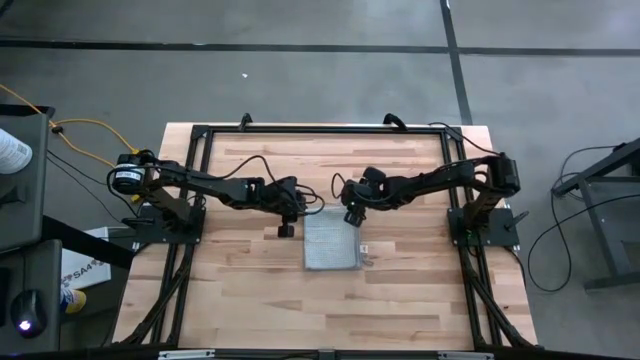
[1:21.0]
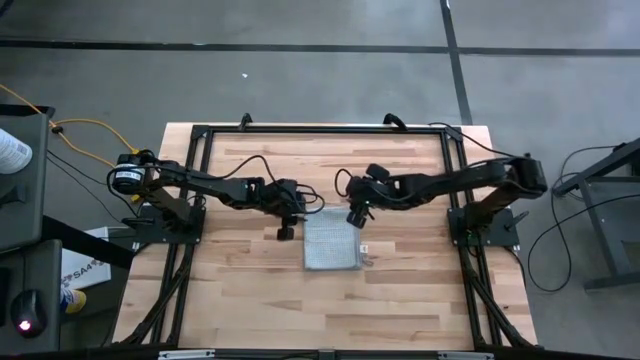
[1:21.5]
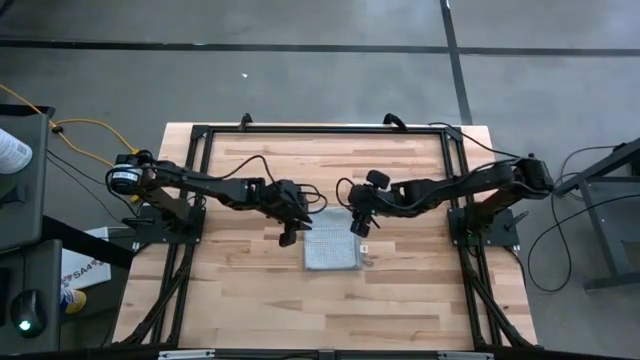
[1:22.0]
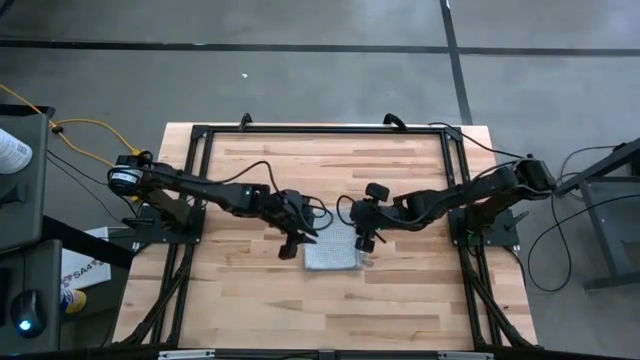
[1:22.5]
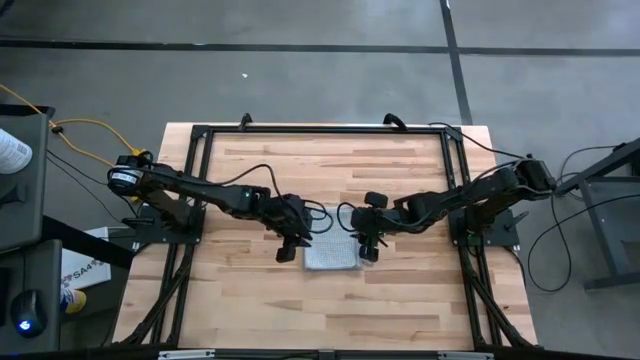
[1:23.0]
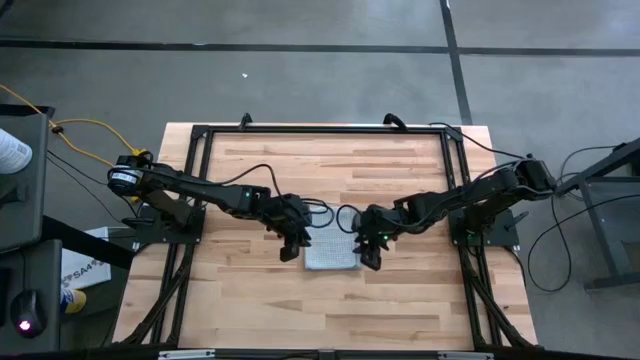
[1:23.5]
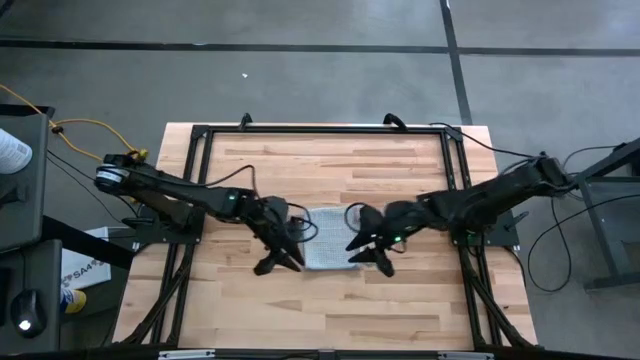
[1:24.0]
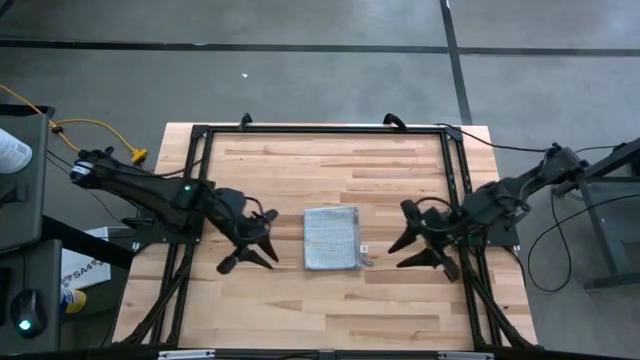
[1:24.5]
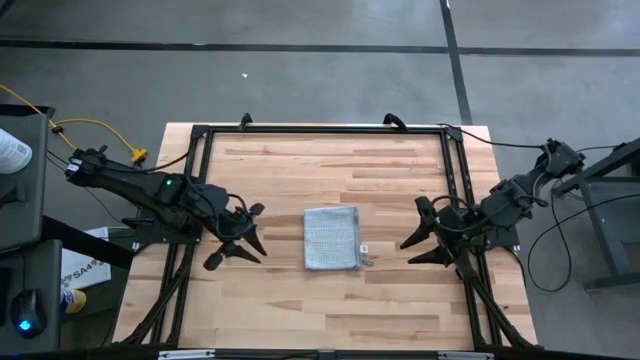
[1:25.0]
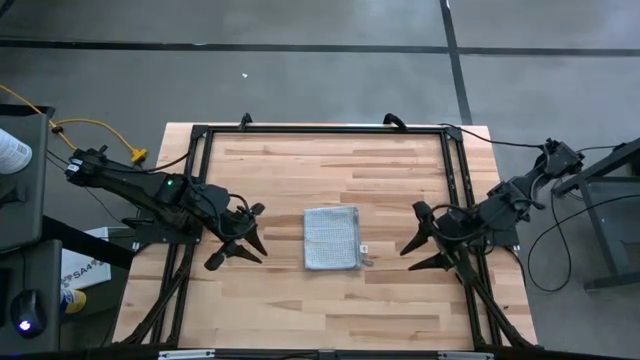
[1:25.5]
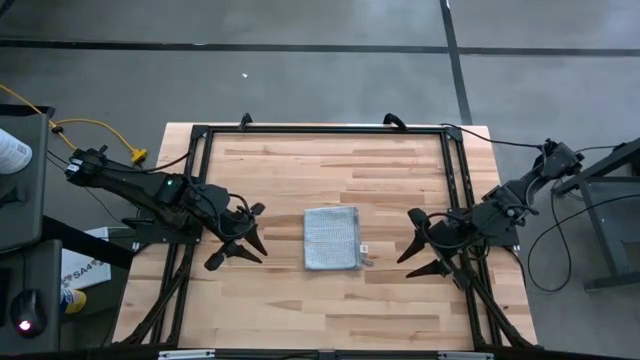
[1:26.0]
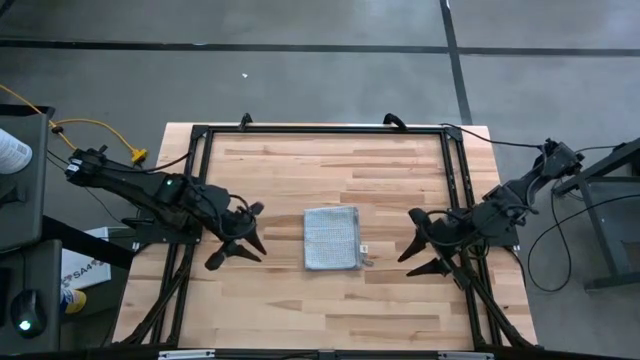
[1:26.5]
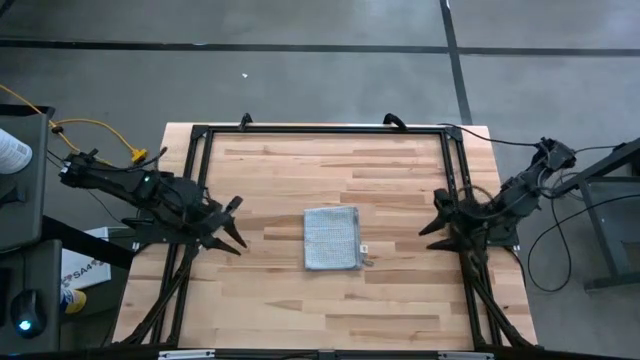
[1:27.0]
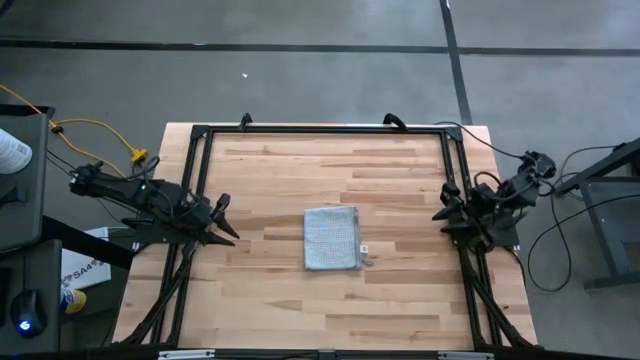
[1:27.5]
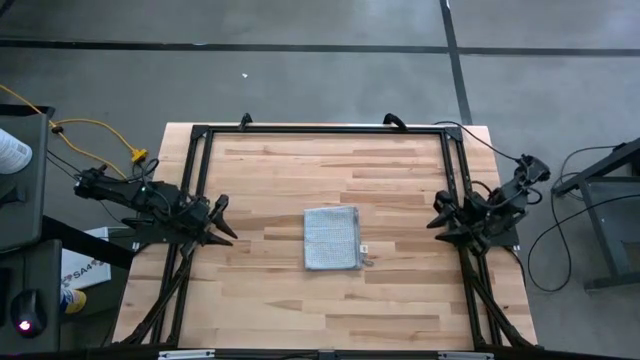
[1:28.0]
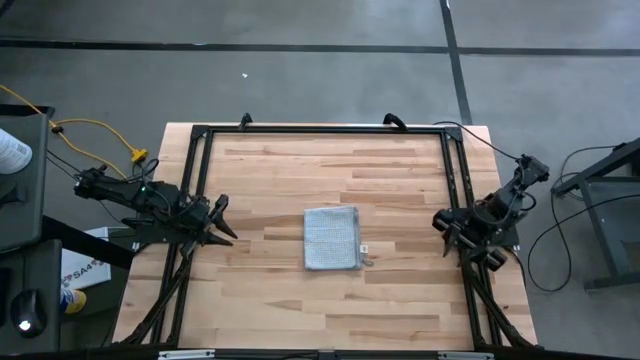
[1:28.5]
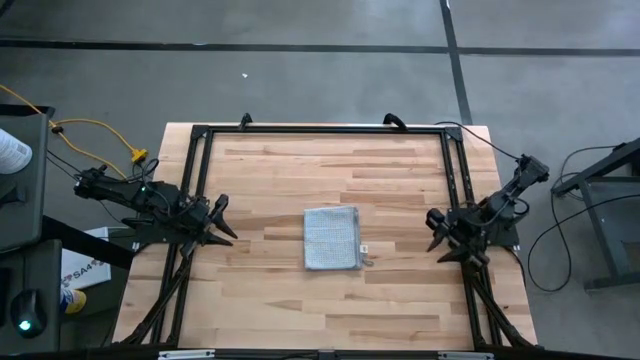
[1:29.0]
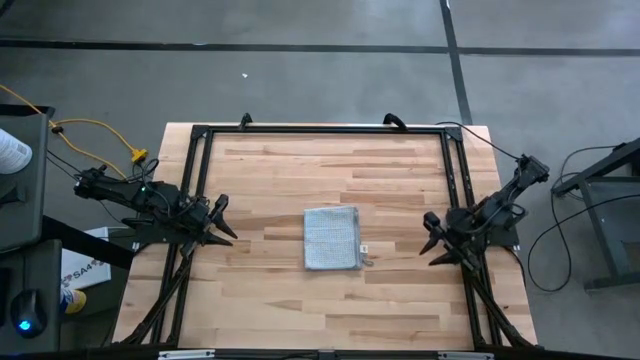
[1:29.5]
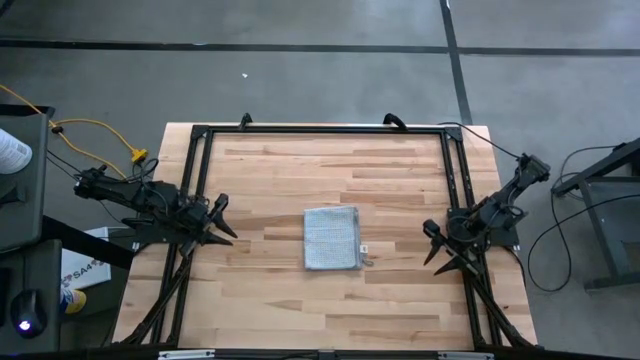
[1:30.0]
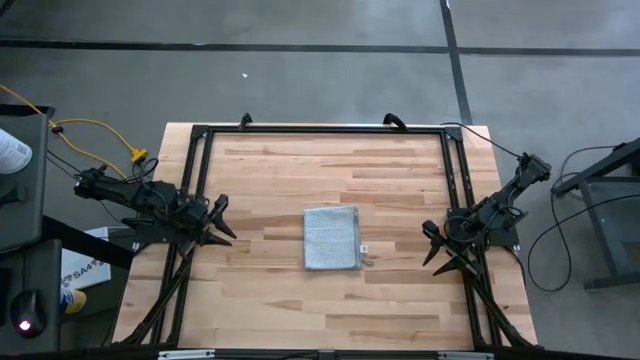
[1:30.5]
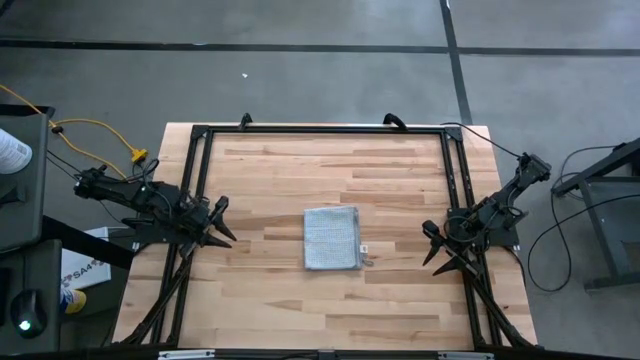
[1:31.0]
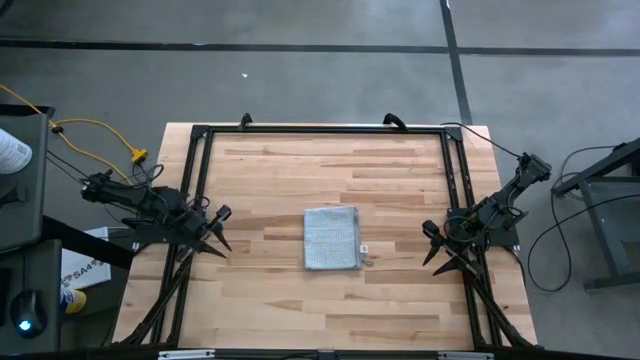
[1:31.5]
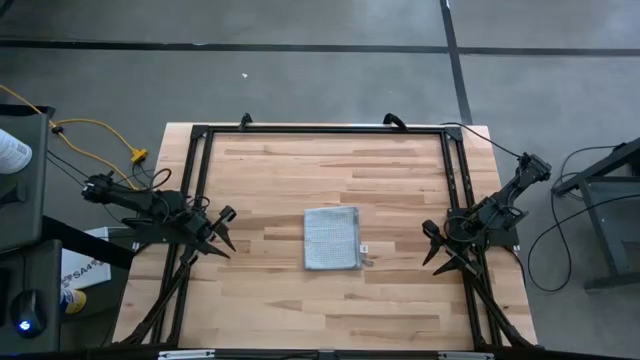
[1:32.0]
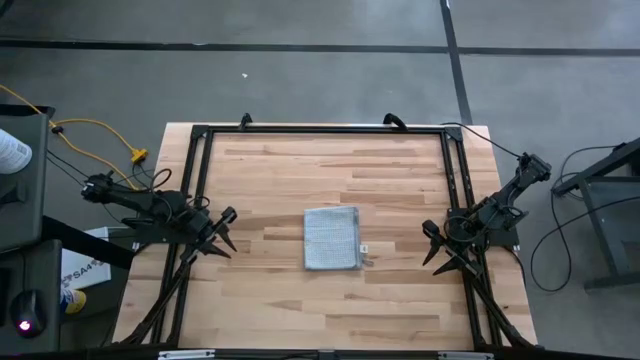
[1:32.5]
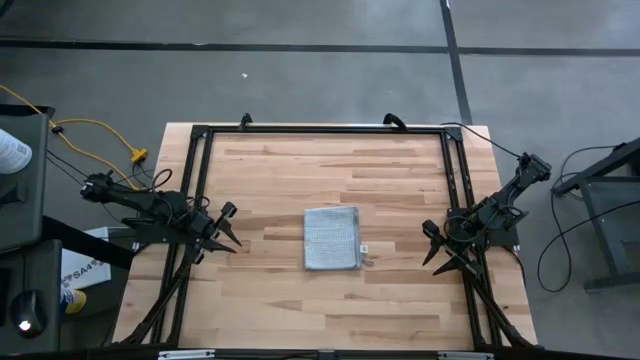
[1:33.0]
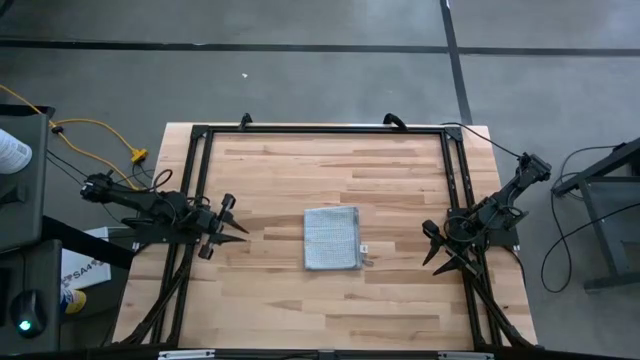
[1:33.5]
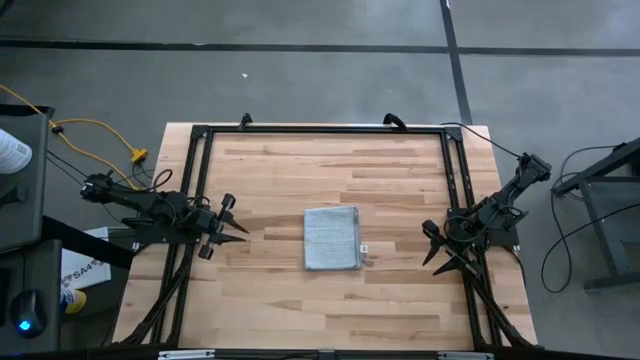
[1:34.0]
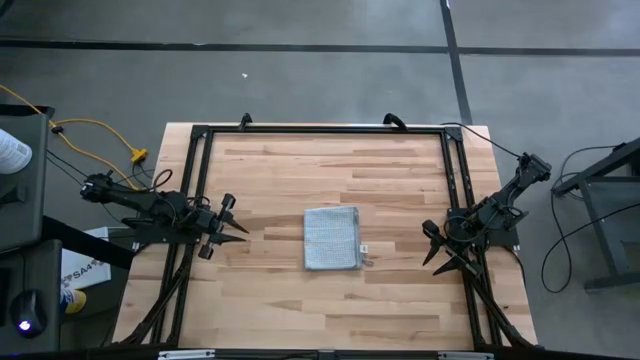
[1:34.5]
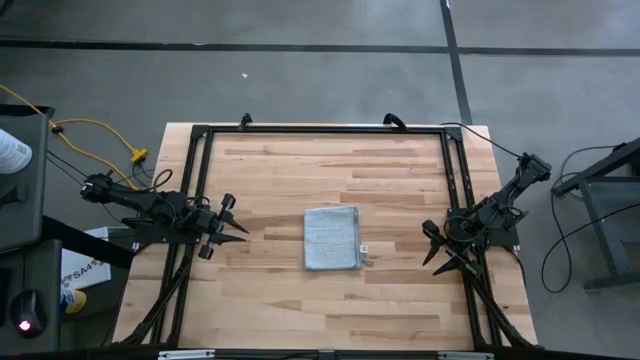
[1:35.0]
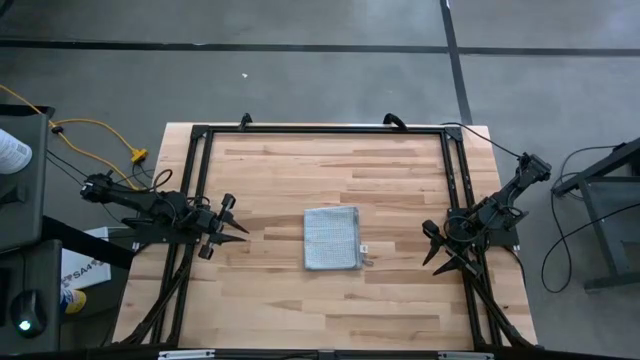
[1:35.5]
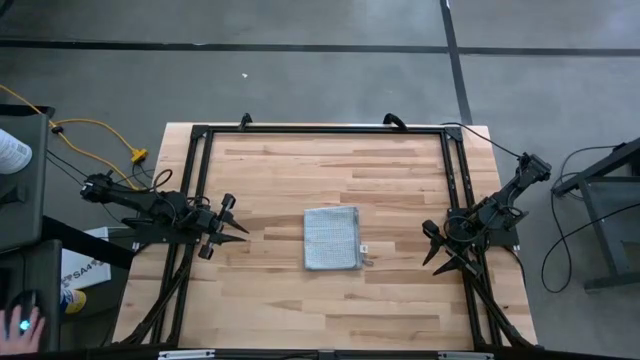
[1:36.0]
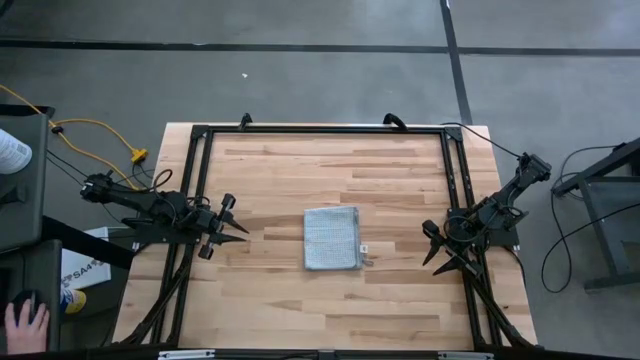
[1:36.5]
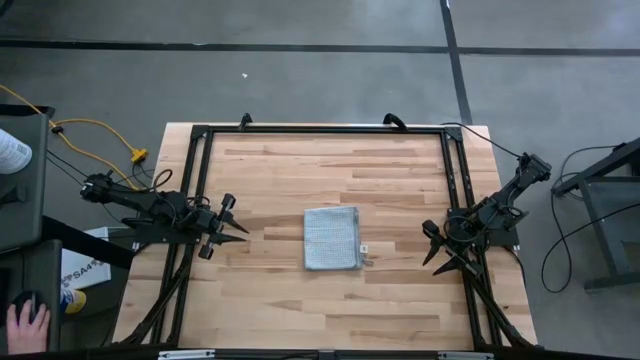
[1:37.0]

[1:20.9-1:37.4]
Task: Fold microfiber towels
Return To Home Position

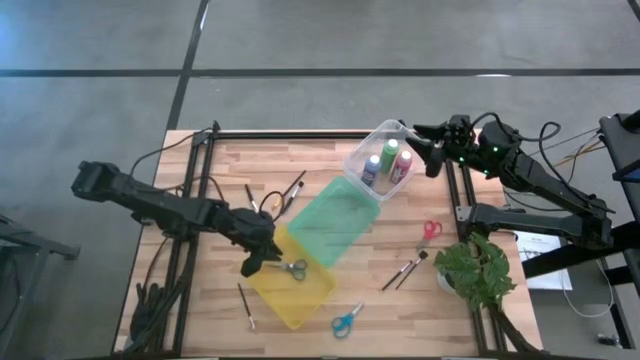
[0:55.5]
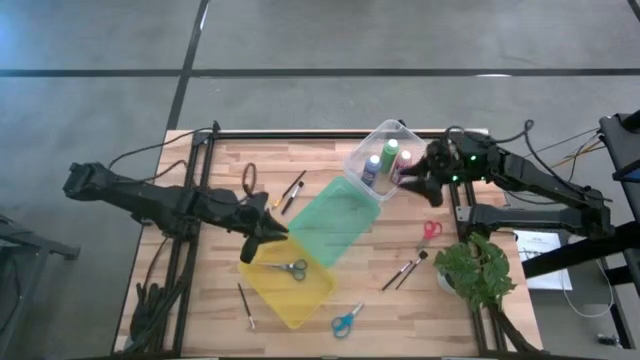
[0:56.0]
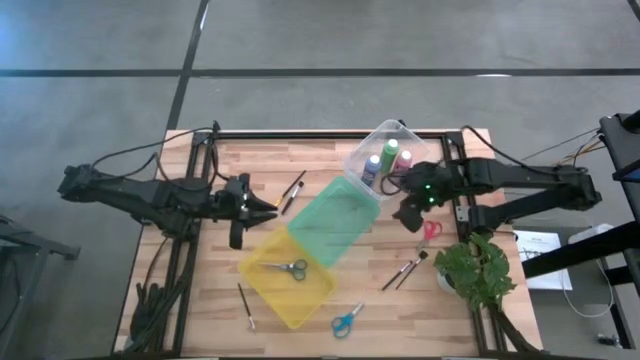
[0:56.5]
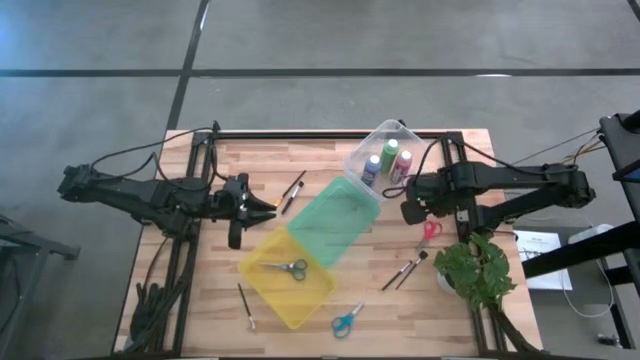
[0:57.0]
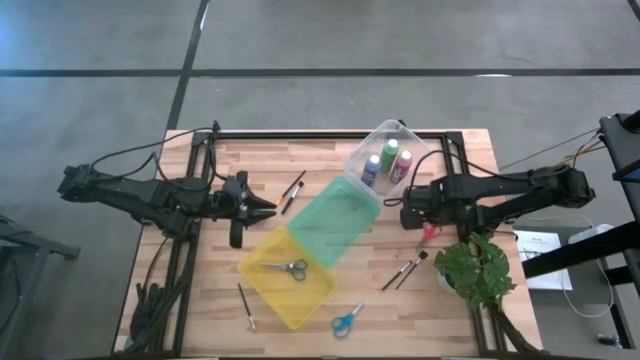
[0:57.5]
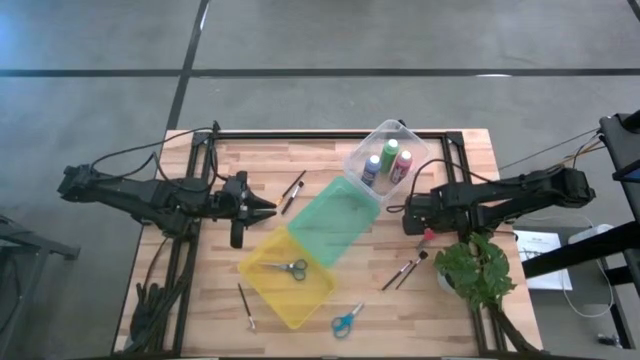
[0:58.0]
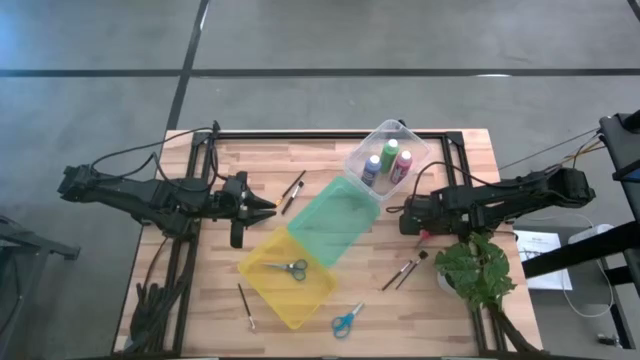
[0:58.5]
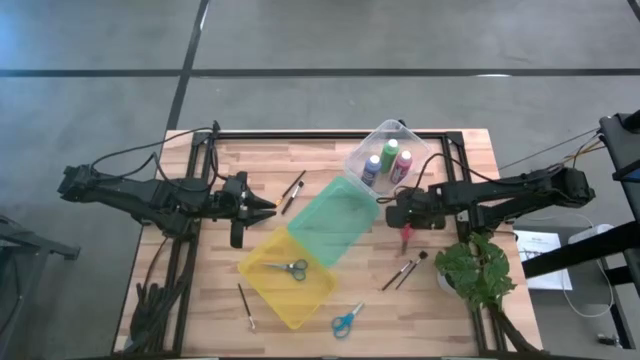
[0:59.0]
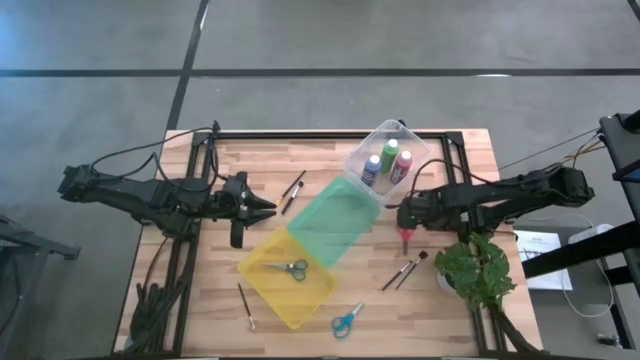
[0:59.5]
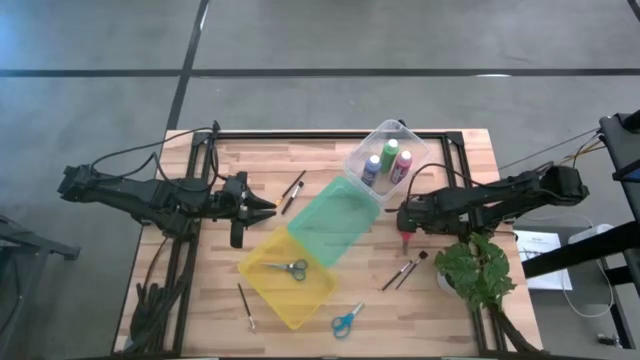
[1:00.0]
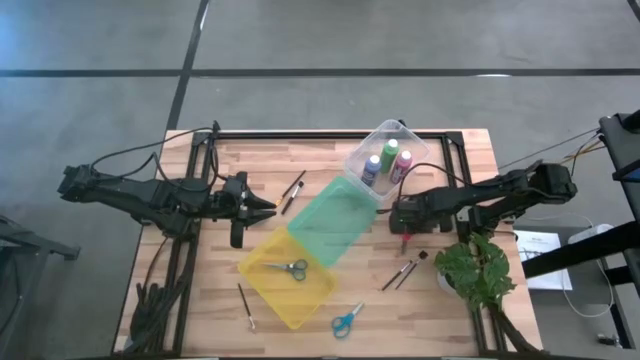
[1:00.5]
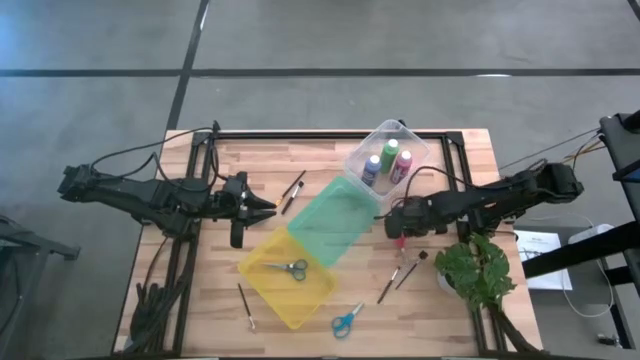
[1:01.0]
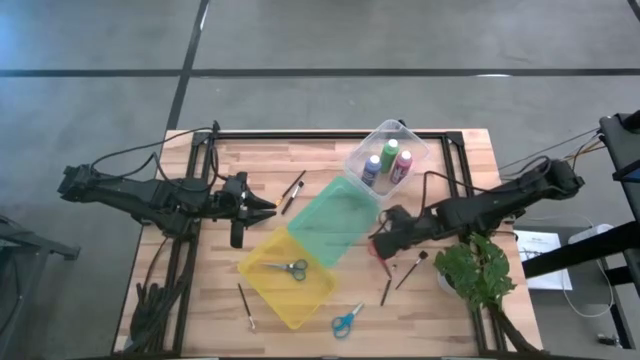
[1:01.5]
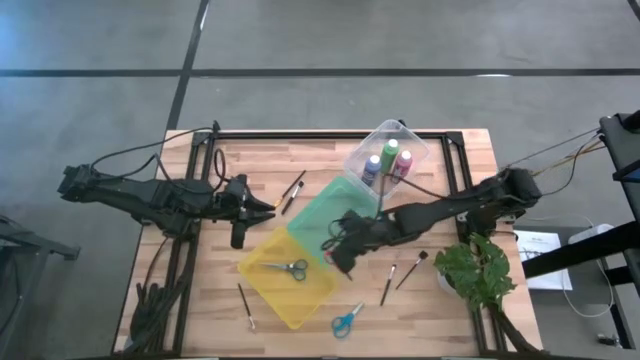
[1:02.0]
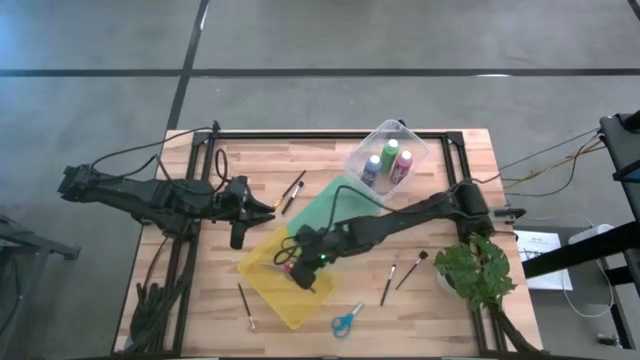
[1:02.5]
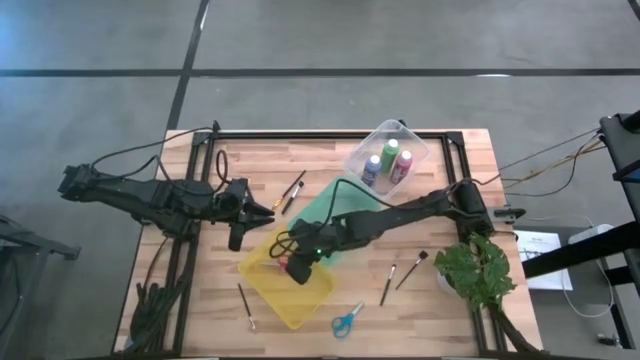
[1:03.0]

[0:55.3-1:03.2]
Task: Pick & Place Paint Supplies
Put the orange scissors into the yellow bin
